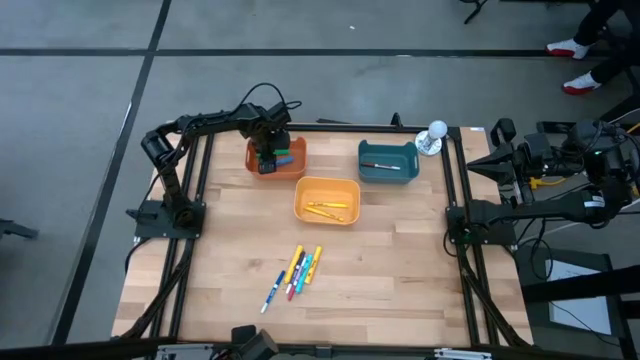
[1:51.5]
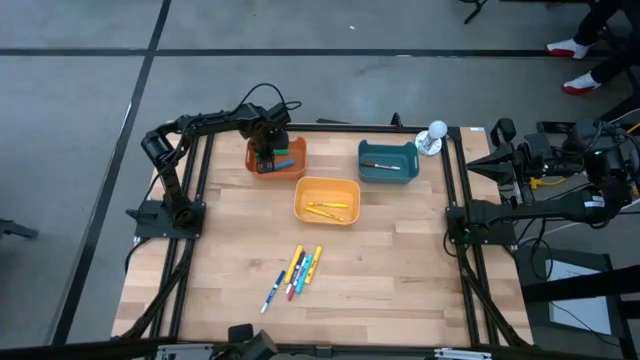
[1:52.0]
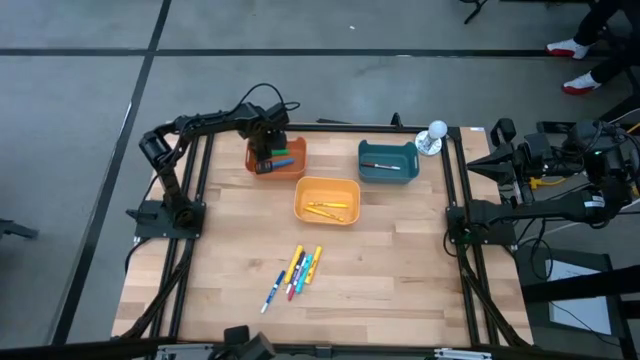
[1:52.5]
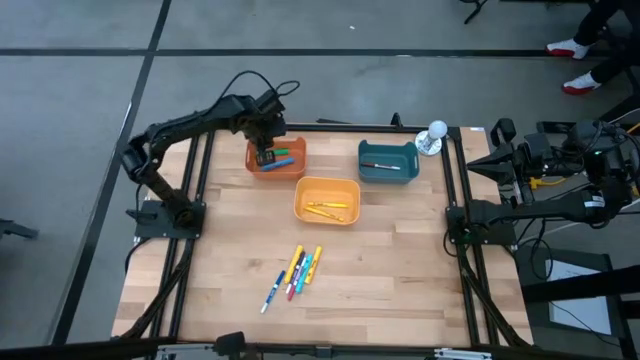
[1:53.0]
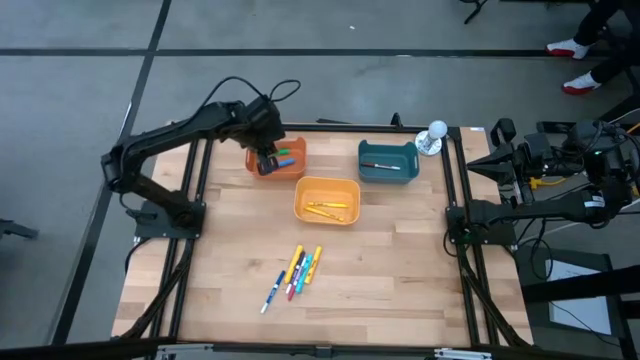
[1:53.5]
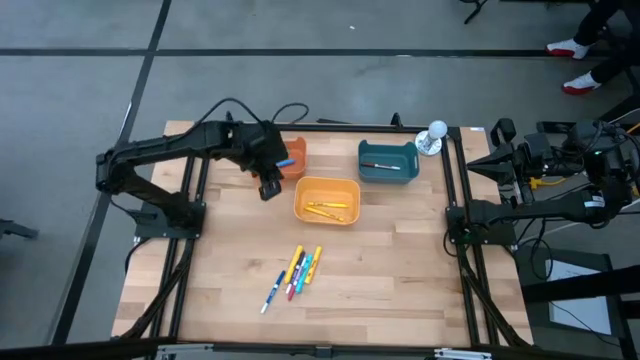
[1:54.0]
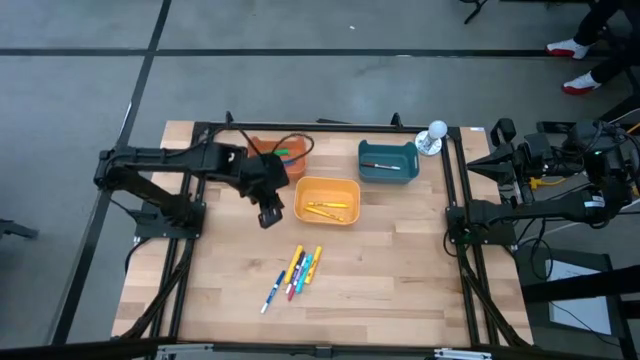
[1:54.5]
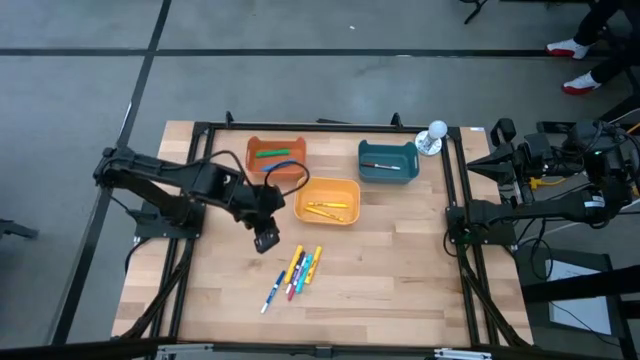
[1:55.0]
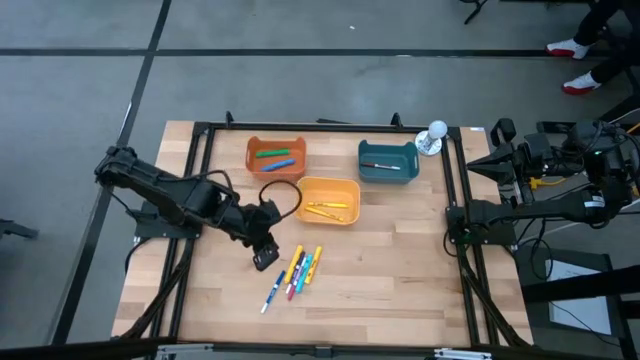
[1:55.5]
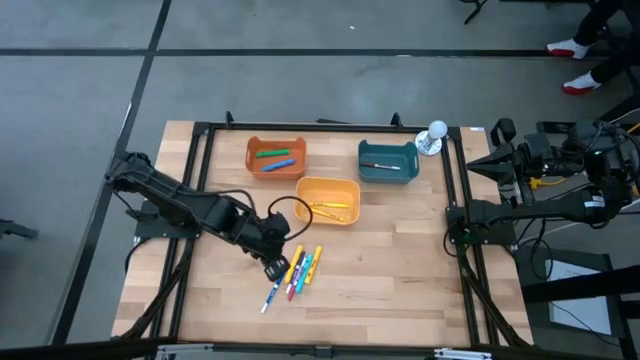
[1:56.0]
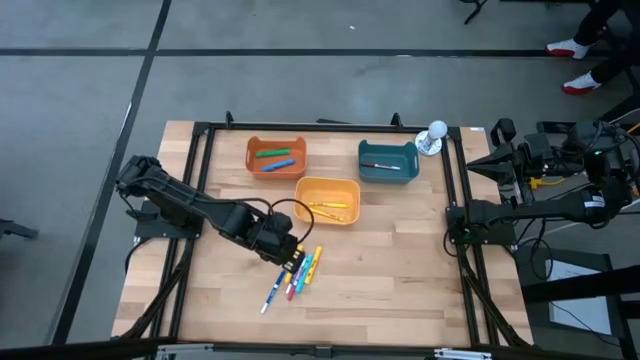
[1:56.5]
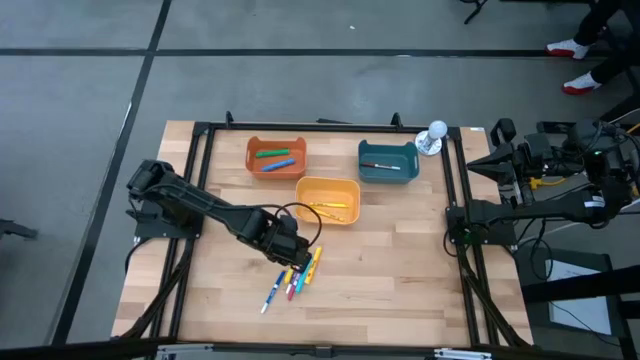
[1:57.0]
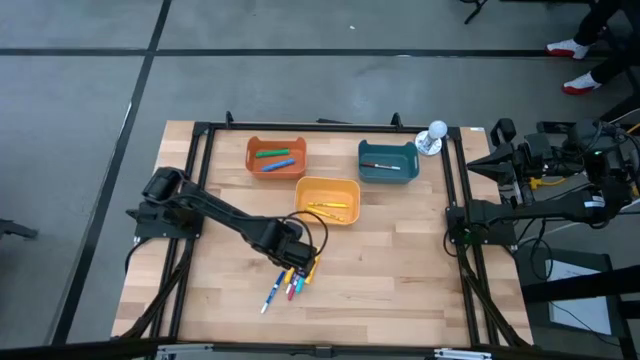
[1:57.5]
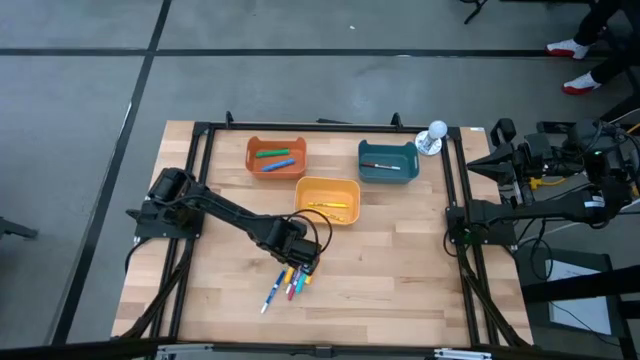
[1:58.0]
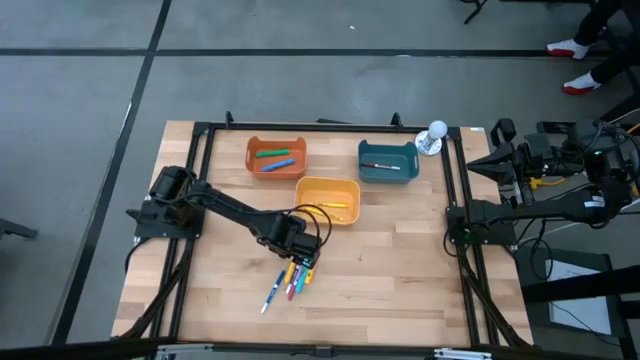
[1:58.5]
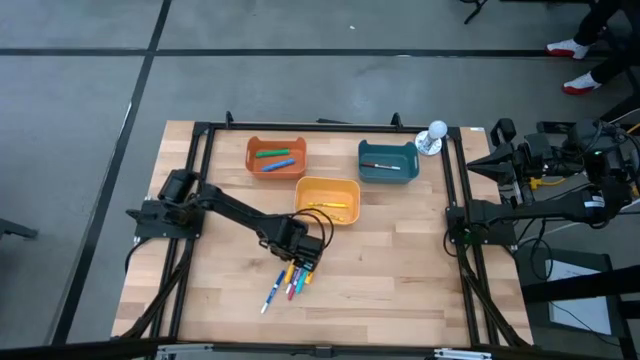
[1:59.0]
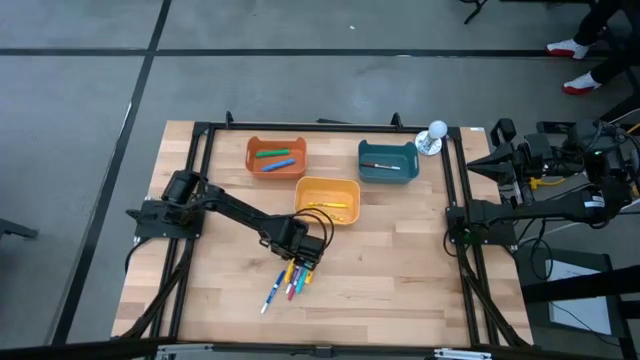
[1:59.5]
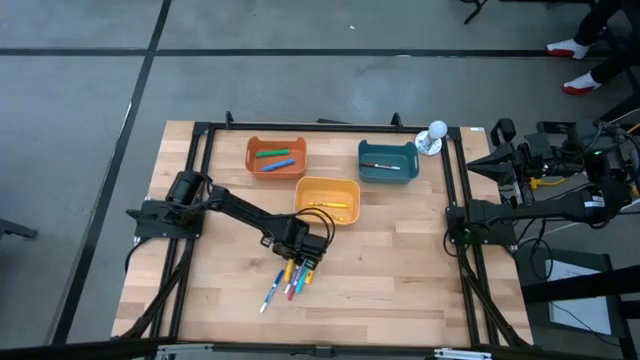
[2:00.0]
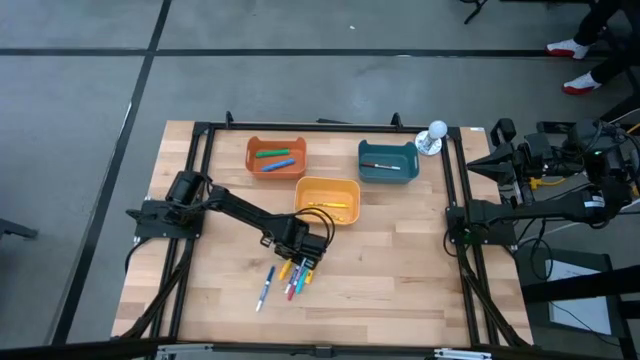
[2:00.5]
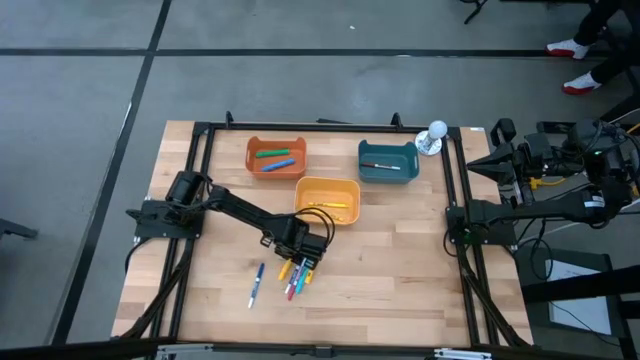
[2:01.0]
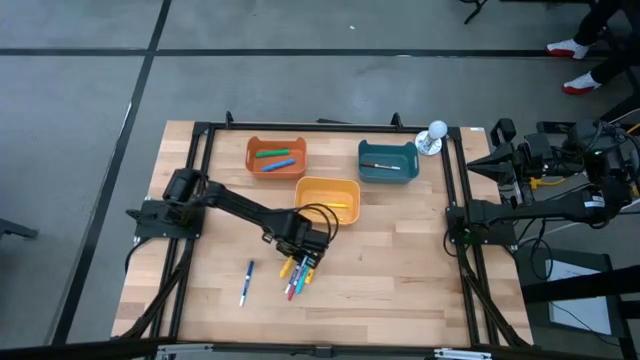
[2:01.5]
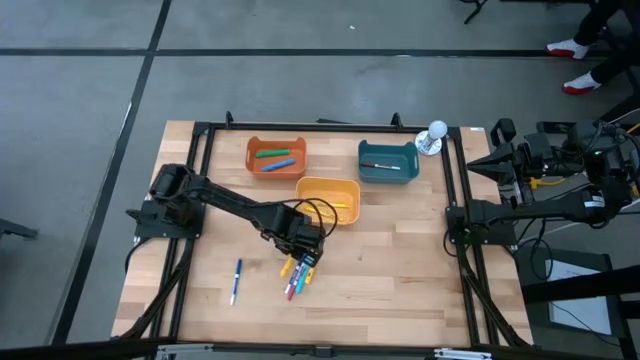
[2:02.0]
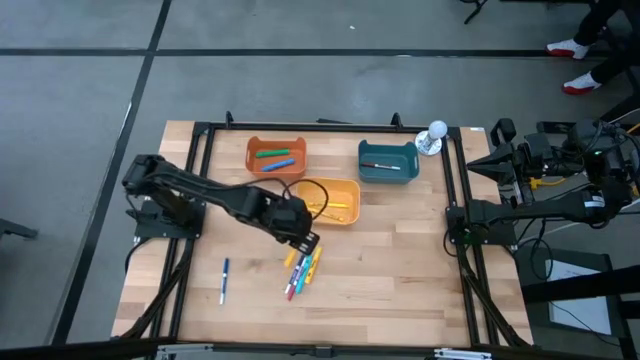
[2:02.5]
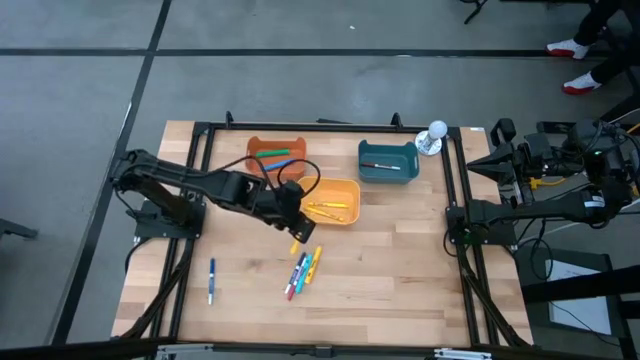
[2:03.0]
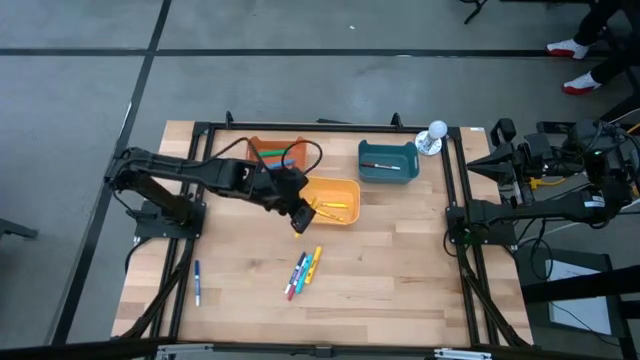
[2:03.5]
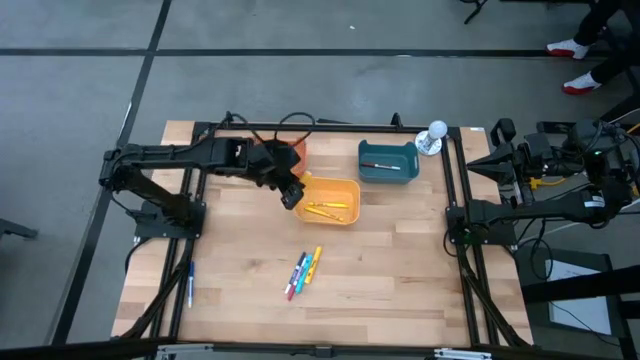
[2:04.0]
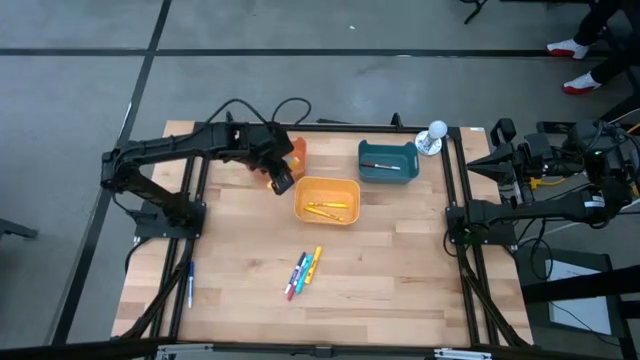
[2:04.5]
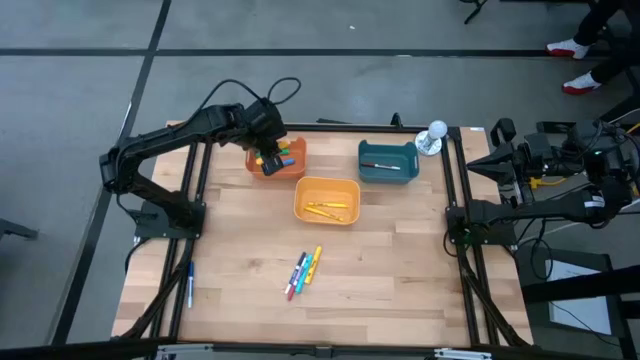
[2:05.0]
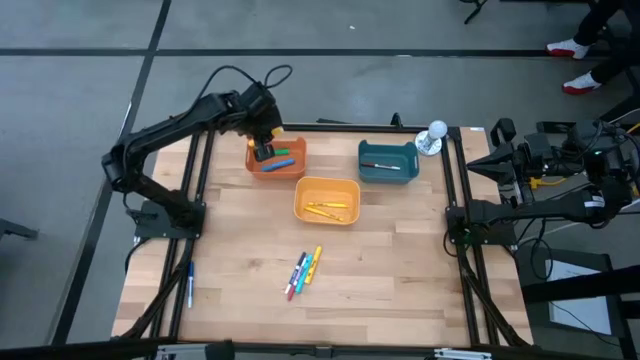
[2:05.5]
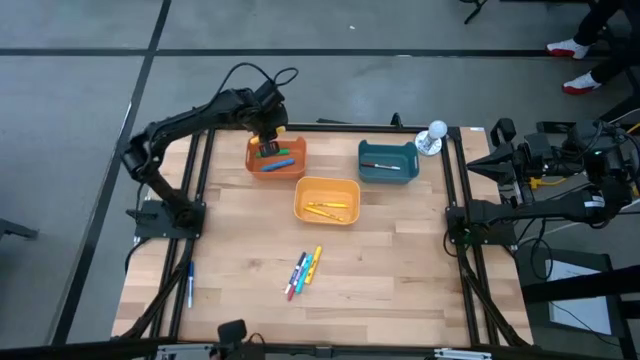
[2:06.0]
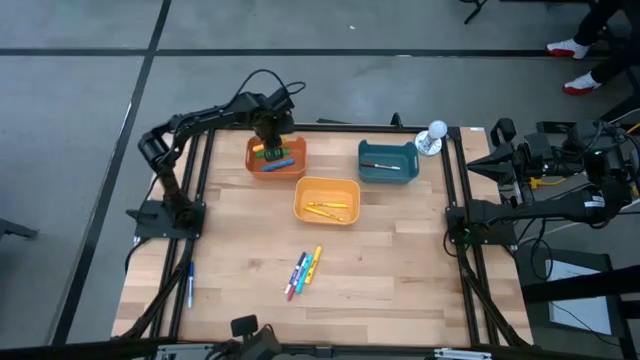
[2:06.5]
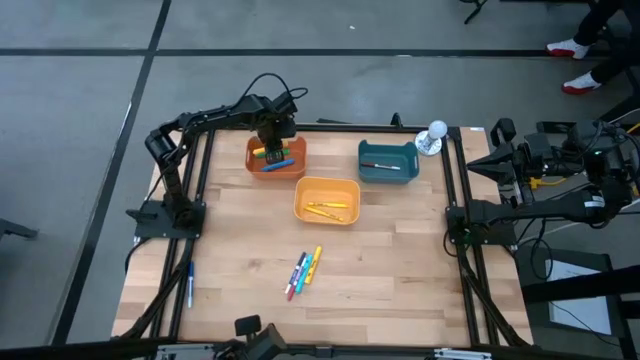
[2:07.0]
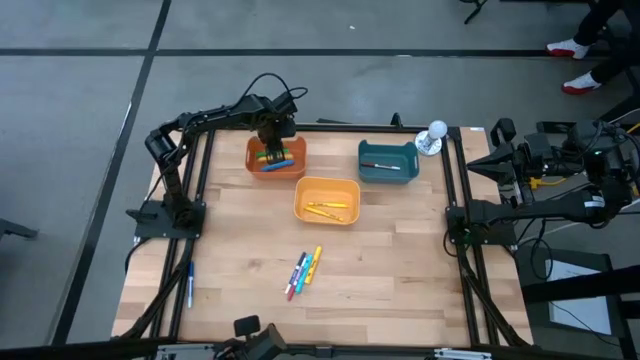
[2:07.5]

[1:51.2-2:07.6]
Task: Pick & Place Markers
Put the left big yellow highlighter pen into the orange bin

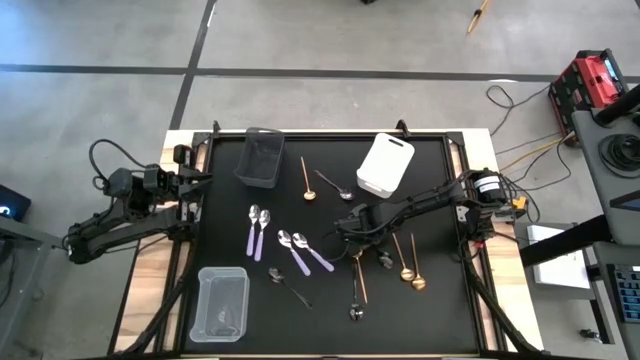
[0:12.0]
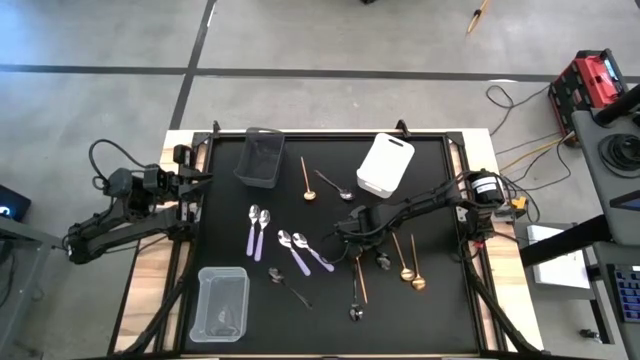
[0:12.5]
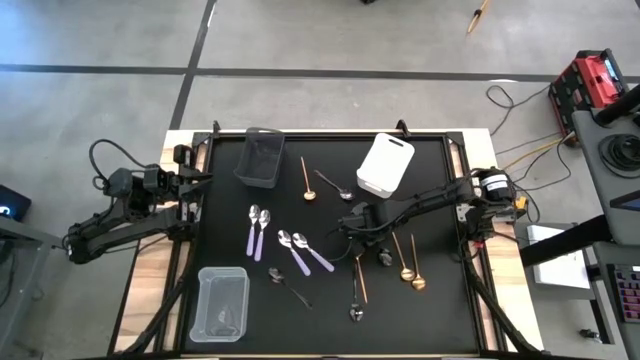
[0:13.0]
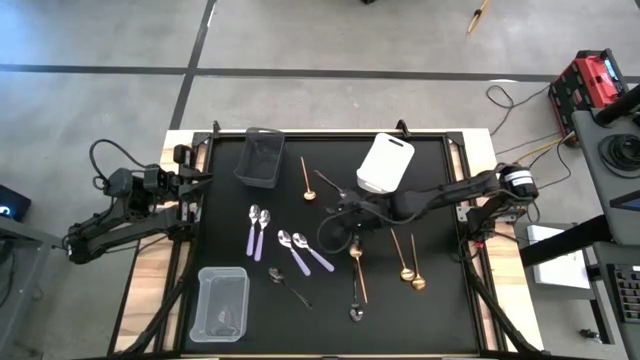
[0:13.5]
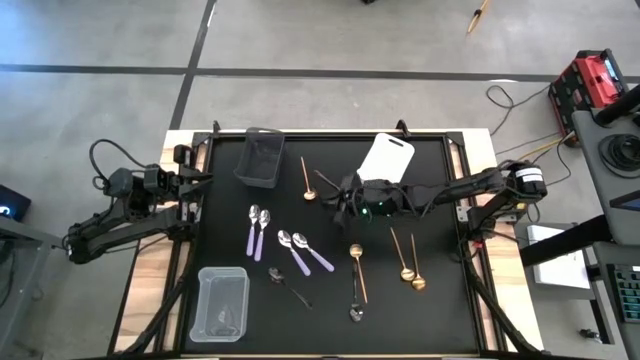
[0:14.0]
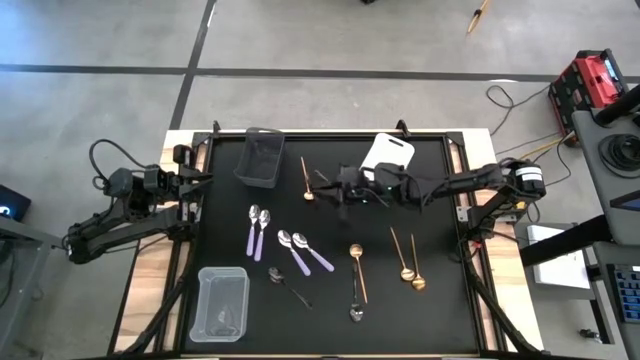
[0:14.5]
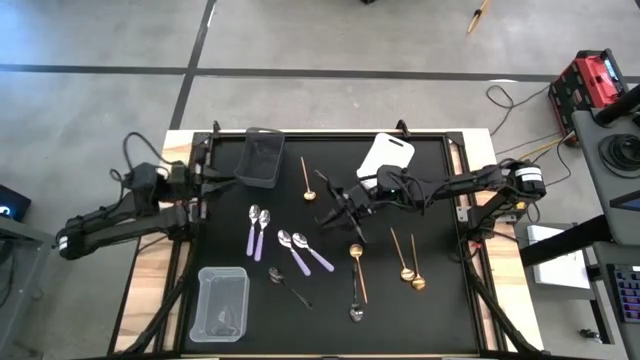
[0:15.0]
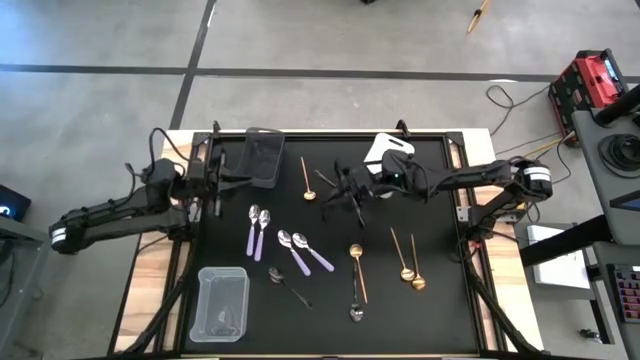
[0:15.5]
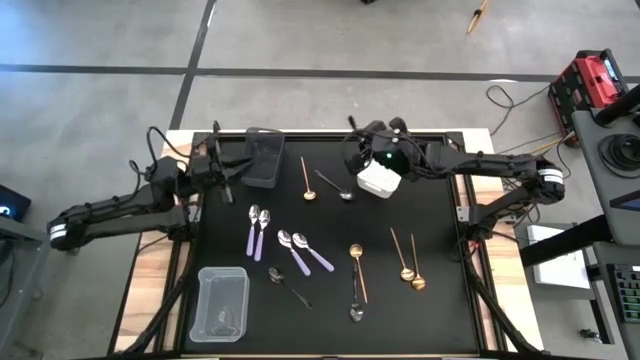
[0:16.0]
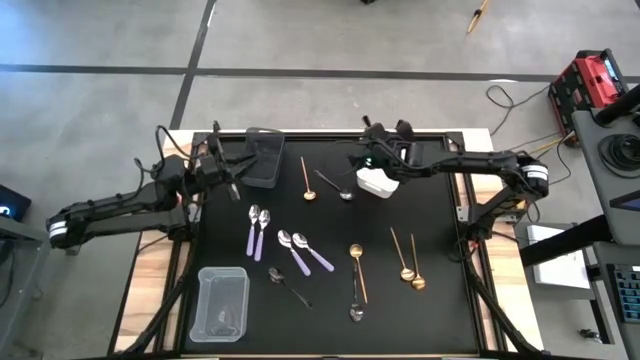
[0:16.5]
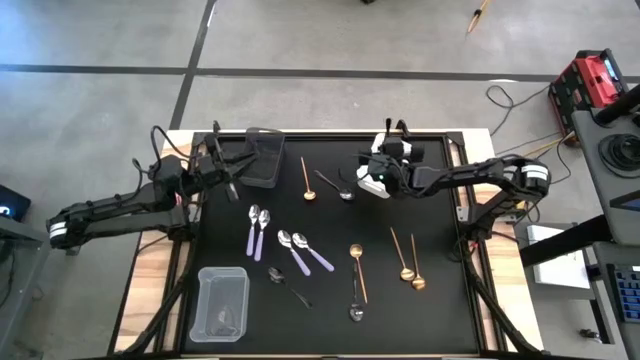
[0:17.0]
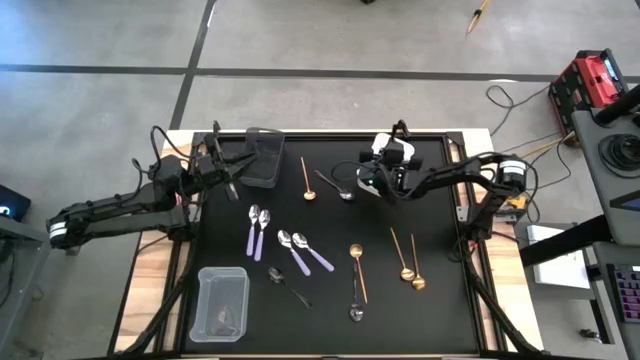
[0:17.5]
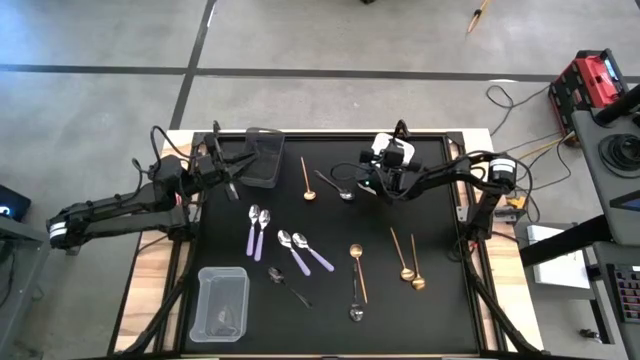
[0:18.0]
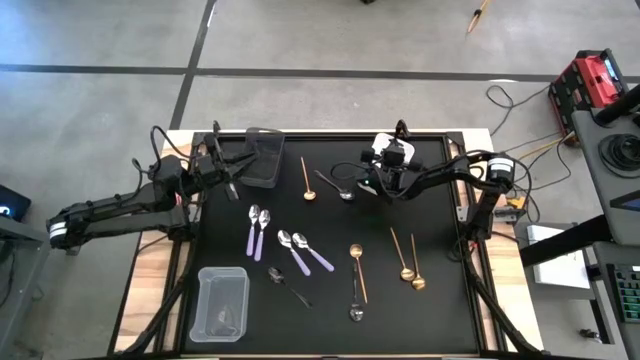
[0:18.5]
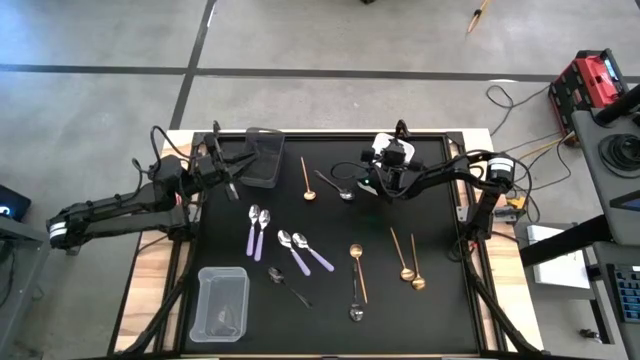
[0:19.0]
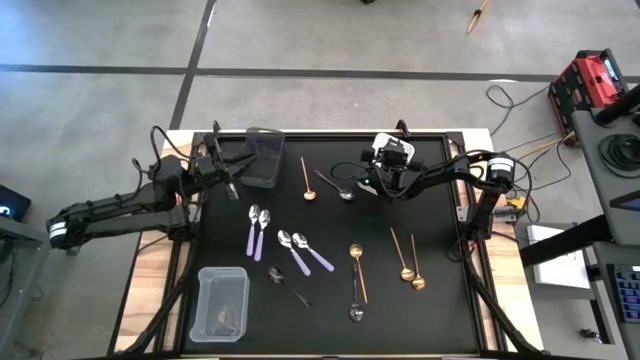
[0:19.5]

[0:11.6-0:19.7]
Task: Sort silverware by color (type)
Put the black spoon into the white bin
